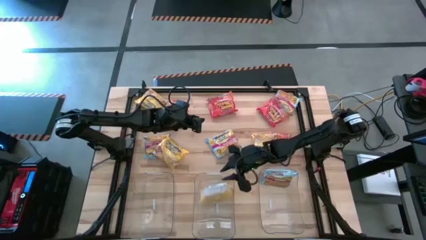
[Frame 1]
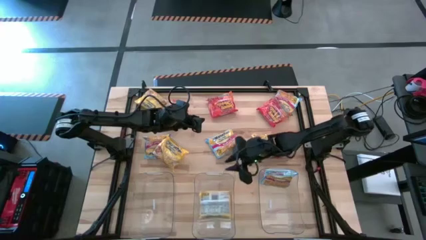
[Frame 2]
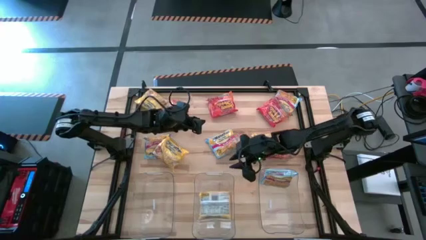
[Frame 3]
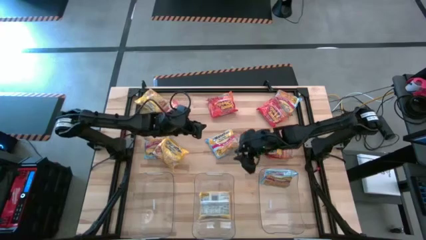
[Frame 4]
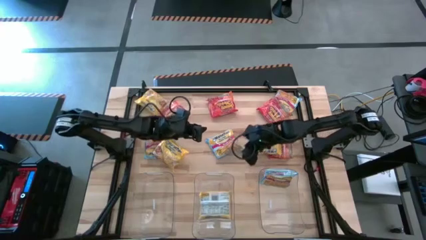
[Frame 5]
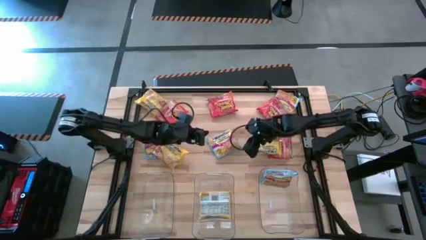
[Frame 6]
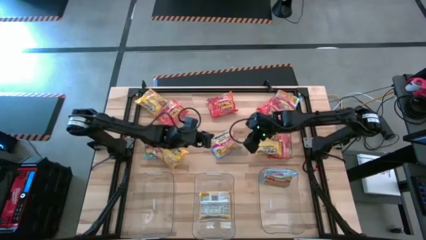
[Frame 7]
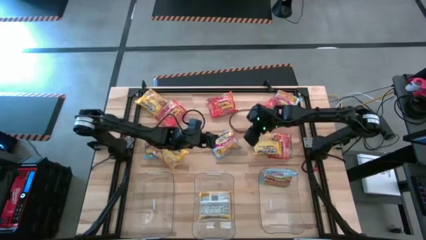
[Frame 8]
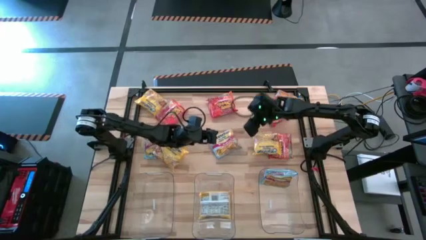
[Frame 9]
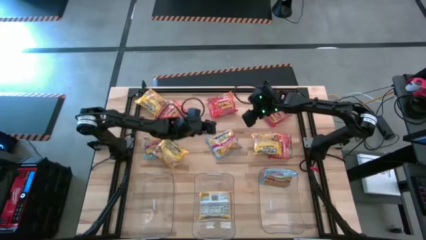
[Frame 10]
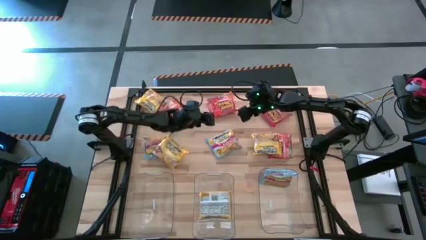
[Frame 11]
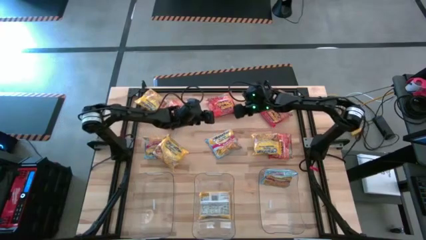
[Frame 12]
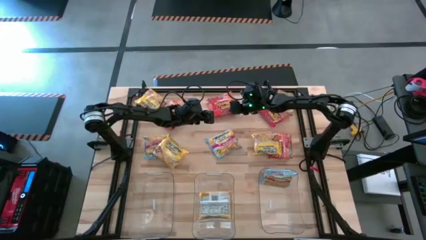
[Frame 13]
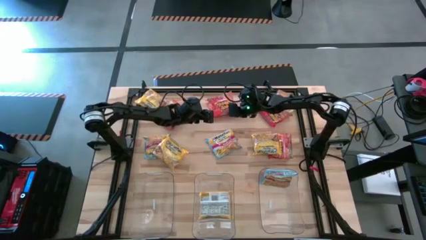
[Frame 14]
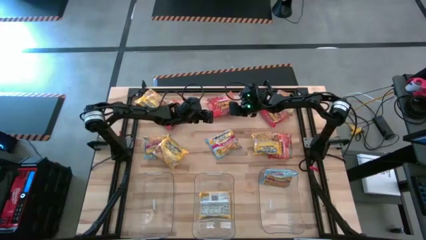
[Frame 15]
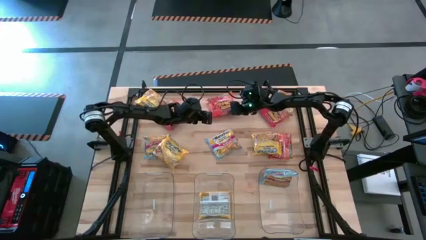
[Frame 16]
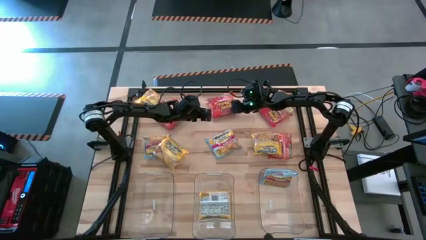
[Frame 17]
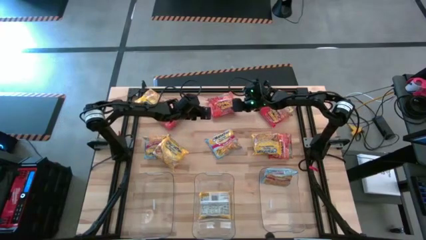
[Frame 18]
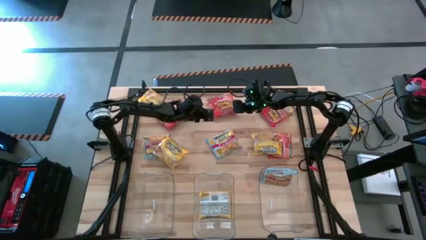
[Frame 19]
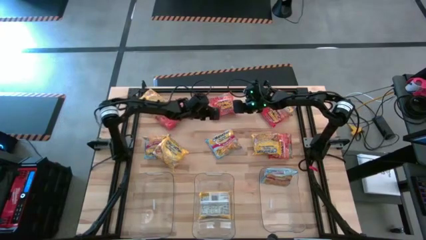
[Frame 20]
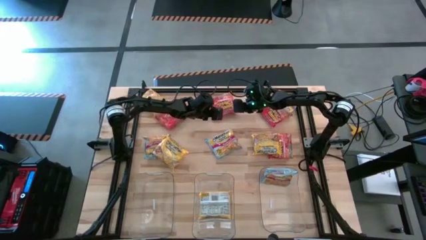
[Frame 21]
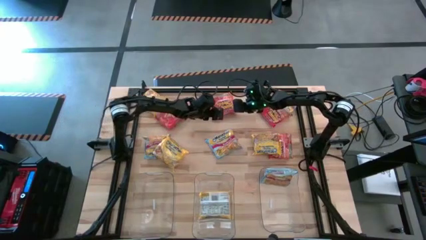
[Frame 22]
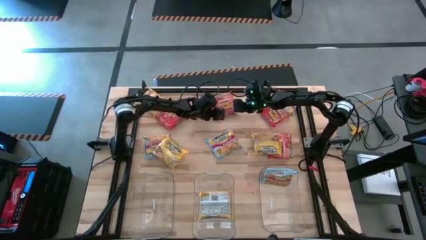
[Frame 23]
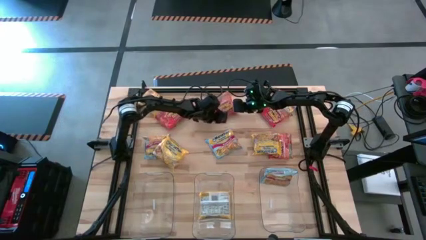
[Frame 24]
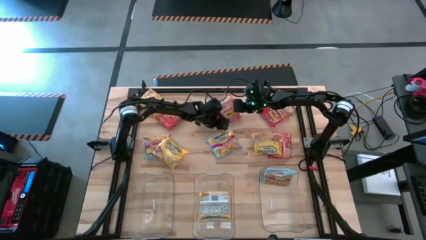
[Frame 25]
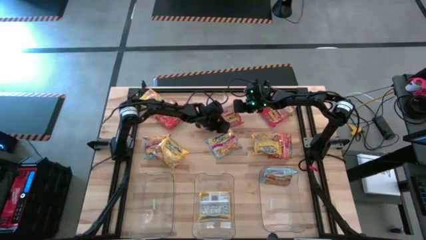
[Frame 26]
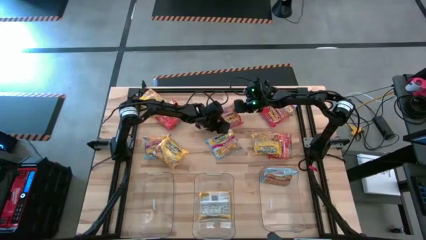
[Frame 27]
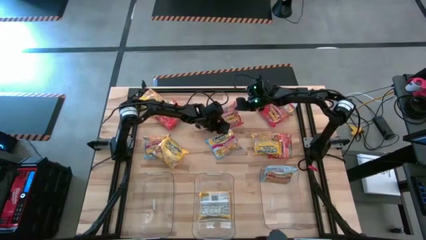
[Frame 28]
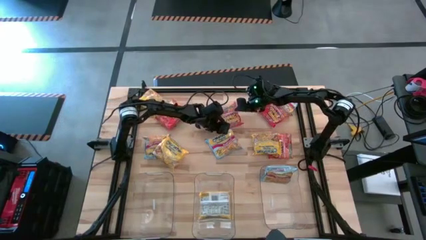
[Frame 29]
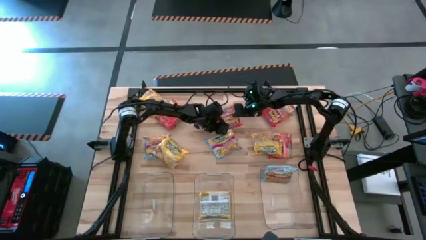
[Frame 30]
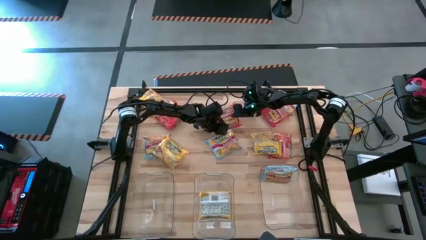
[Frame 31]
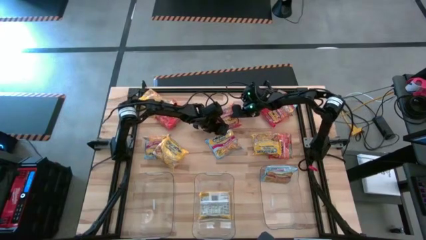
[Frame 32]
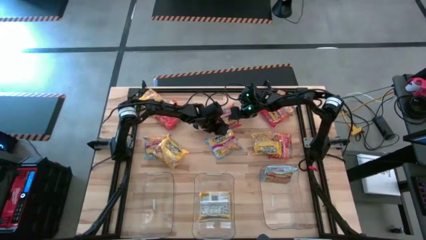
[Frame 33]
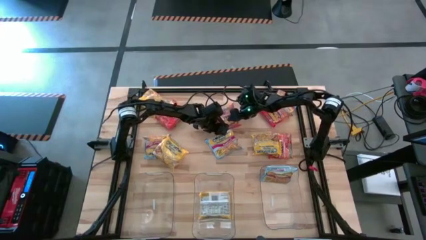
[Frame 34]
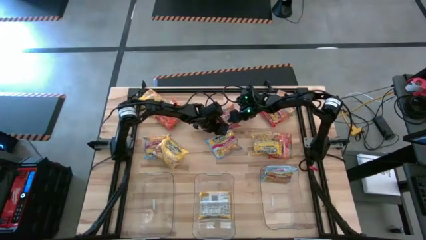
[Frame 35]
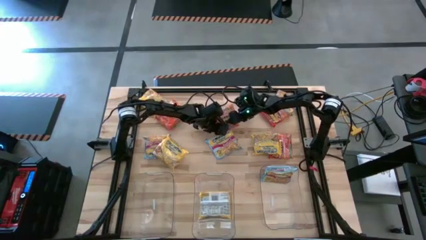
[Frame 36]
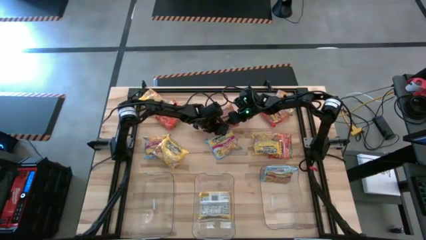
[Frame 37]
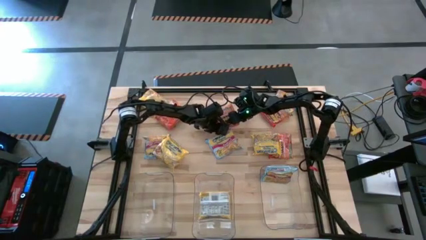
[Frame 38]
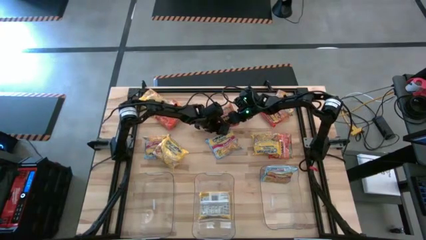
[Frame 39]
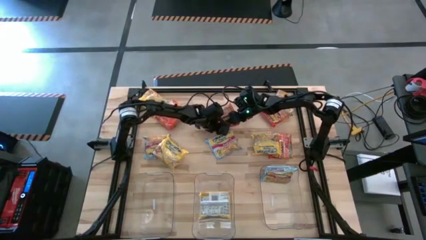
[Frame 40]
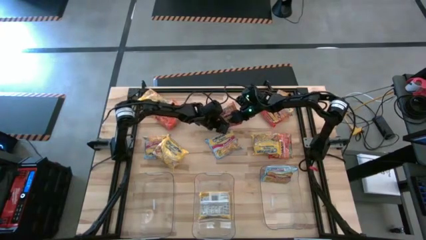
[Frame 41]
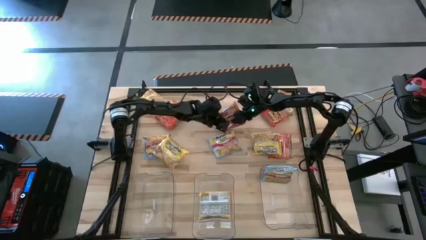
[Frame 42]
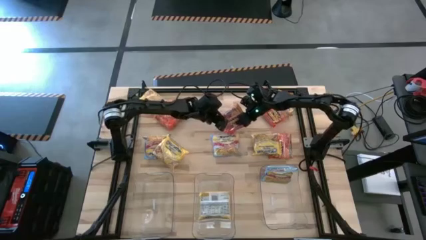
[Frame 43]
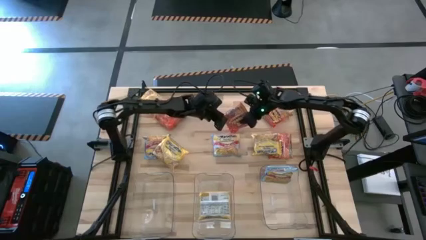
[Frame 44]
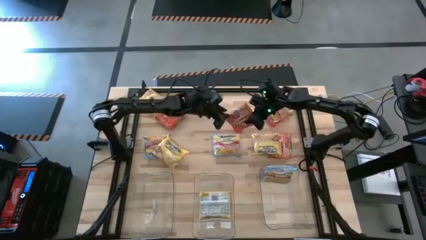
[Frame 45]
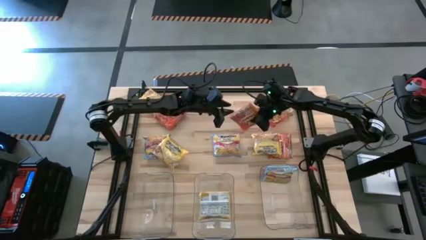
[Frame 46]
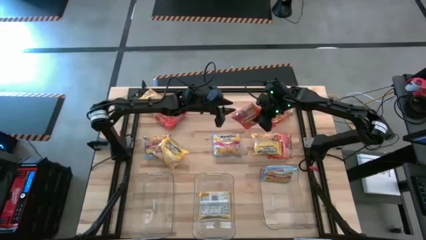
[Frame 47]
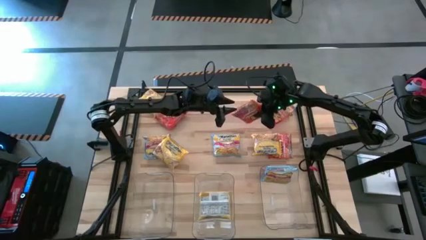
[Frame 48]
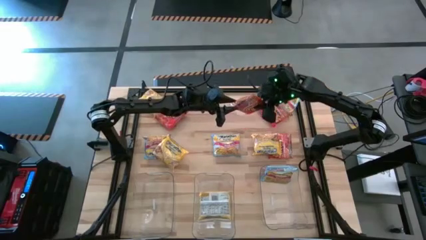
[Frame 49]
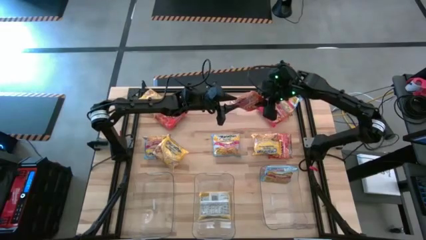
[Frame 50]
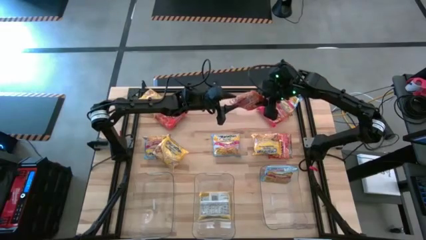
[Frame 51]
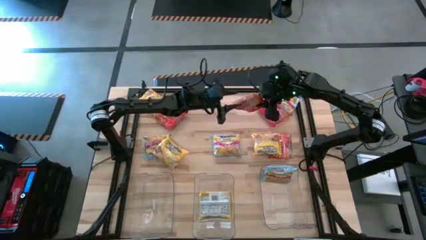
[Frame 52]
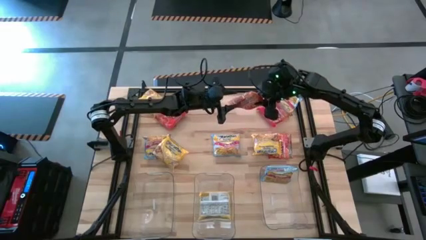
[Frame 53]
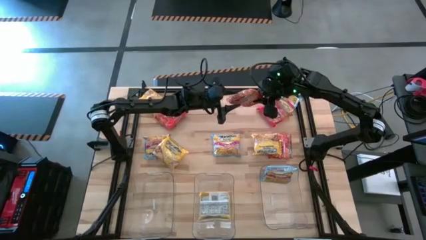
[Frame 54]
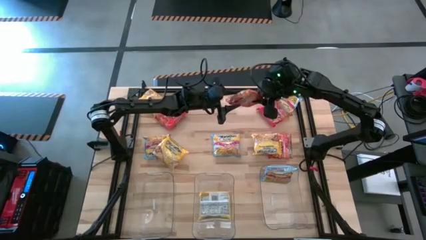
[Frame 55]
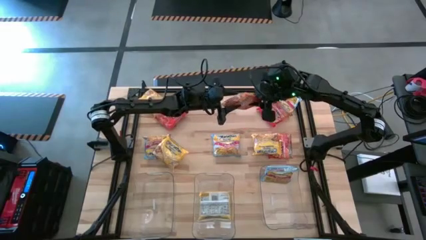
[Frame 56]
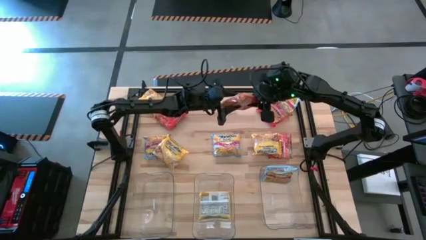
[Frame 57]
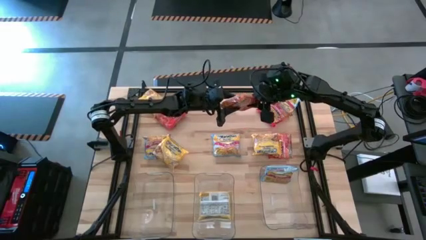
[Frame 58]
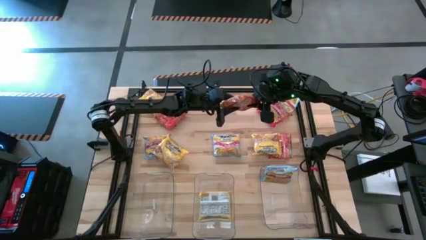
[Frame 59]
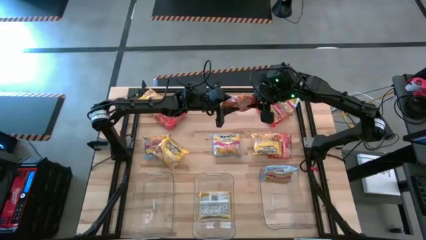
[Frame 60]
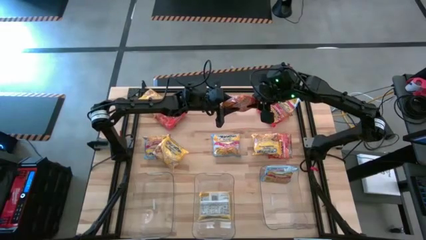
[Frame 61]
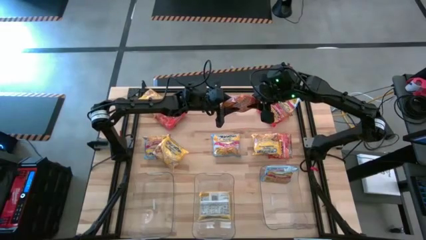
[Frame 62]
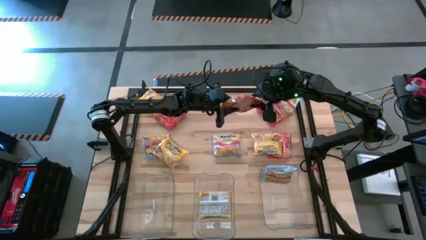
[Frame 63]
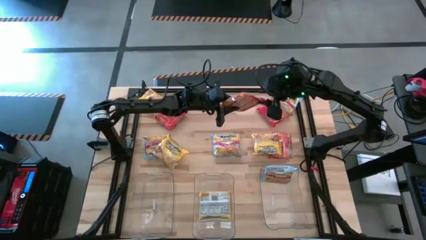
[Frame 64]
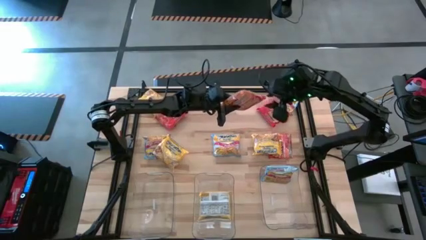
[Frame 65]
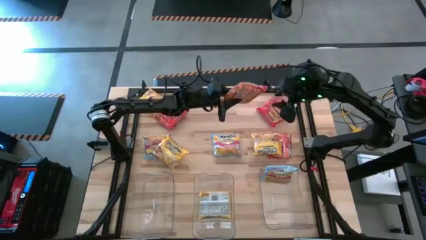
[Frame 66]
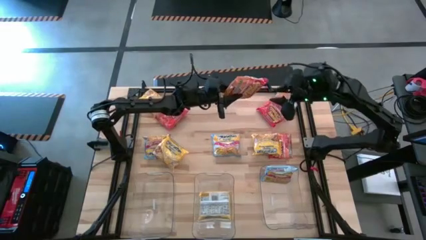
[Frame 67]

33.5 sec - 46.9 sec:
Task: Sort Maruchan noodles
Put the orange noodle pack into the left transparent bin
